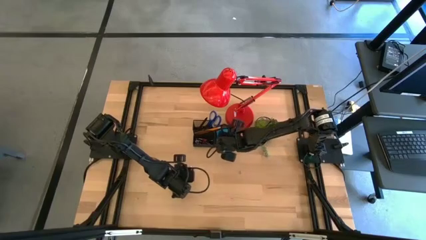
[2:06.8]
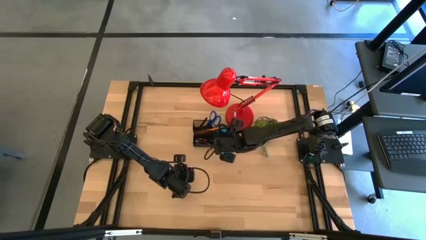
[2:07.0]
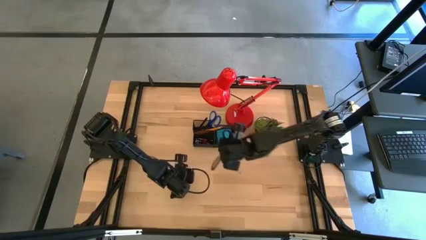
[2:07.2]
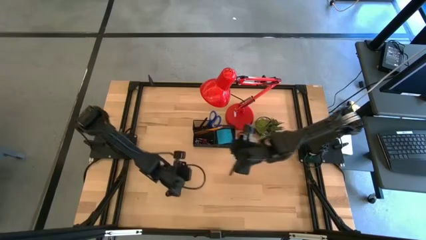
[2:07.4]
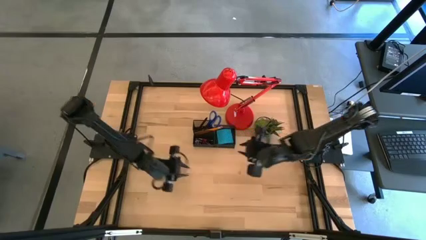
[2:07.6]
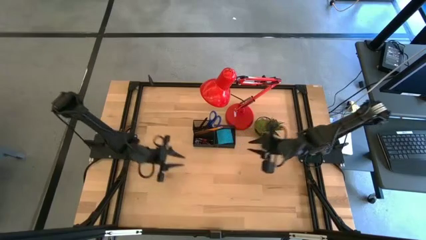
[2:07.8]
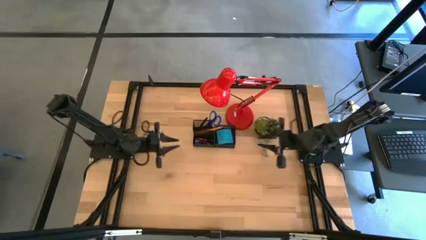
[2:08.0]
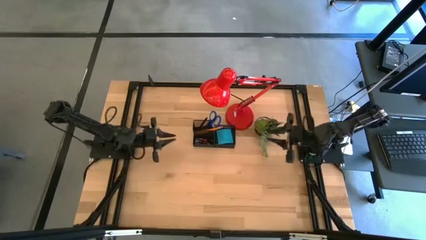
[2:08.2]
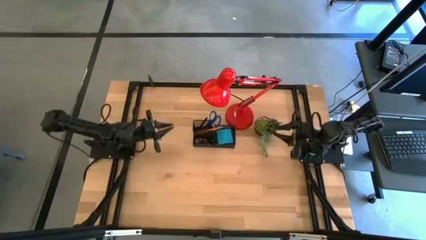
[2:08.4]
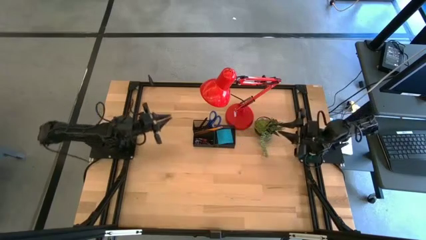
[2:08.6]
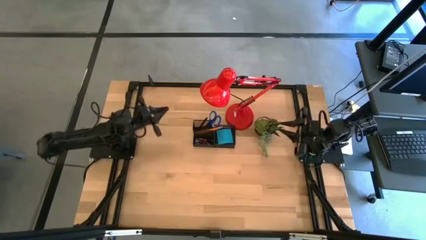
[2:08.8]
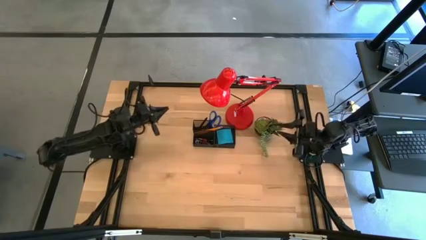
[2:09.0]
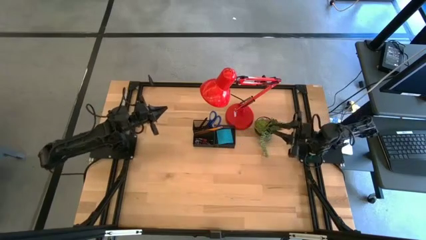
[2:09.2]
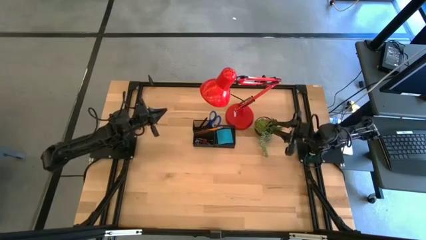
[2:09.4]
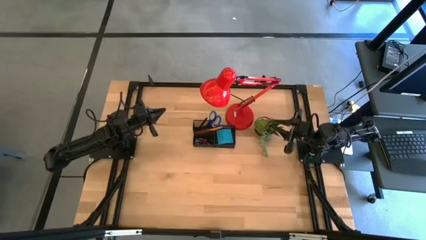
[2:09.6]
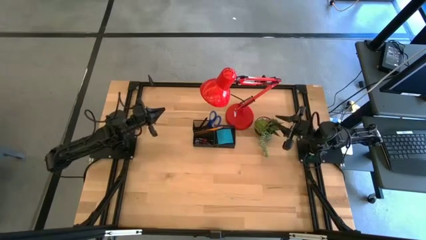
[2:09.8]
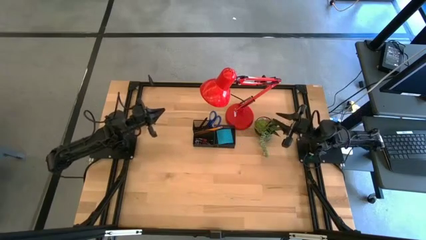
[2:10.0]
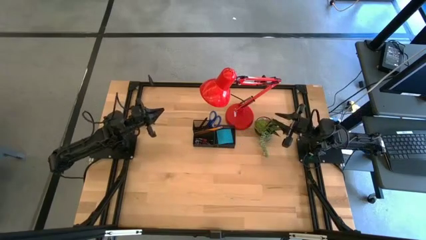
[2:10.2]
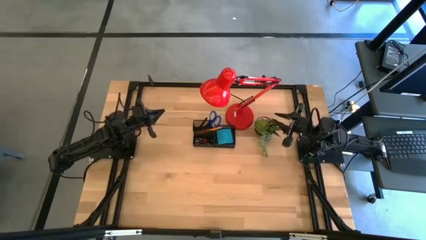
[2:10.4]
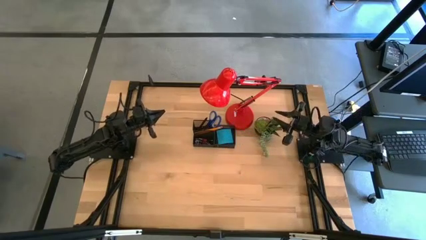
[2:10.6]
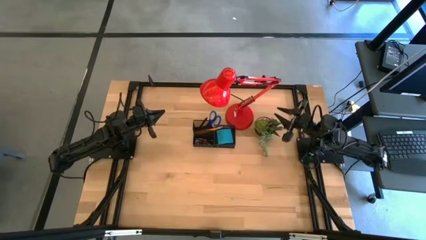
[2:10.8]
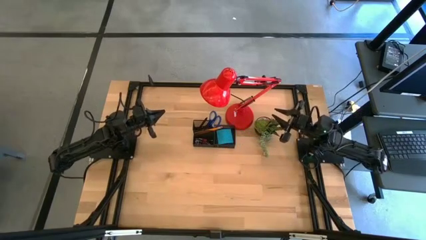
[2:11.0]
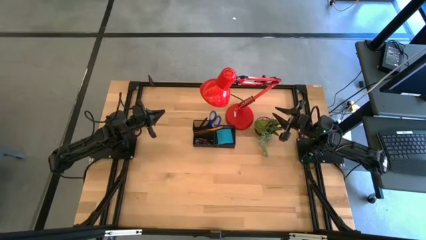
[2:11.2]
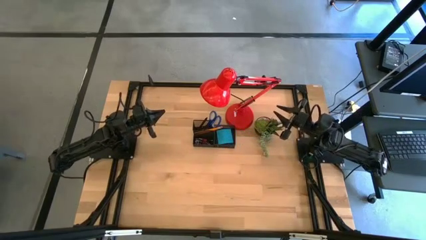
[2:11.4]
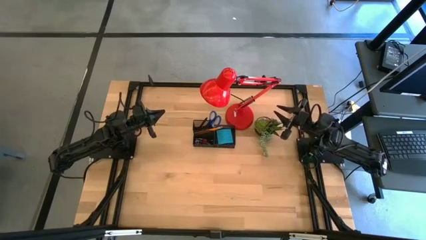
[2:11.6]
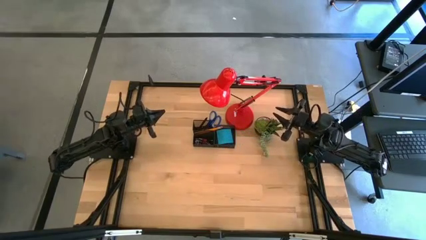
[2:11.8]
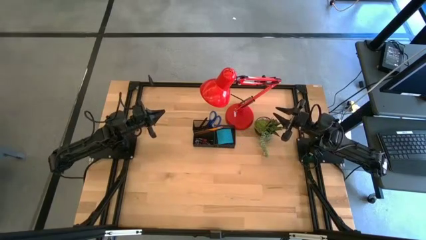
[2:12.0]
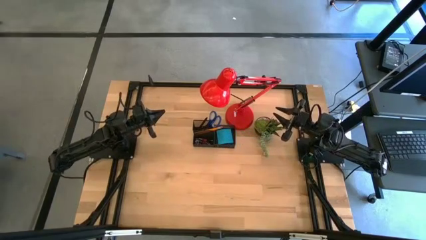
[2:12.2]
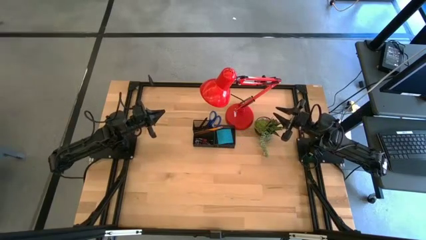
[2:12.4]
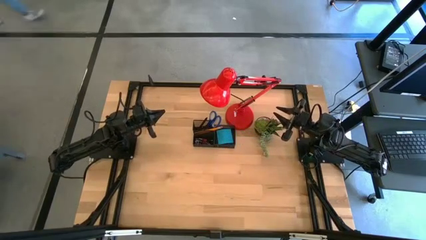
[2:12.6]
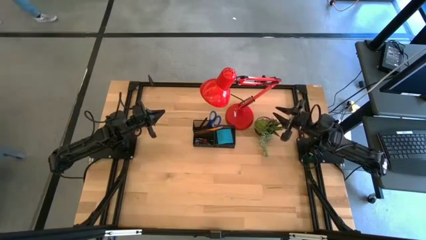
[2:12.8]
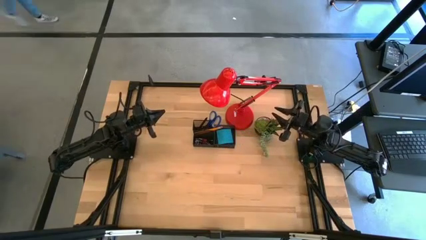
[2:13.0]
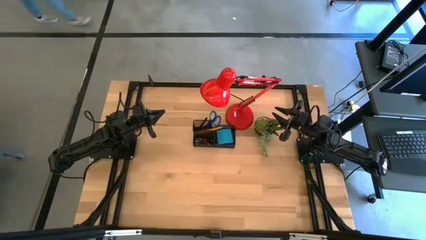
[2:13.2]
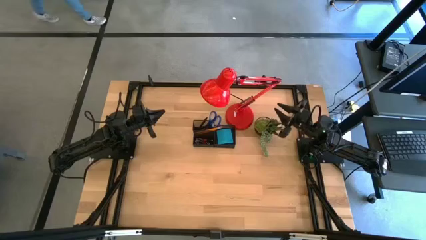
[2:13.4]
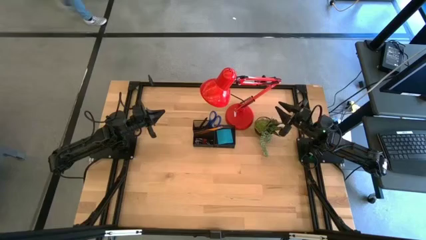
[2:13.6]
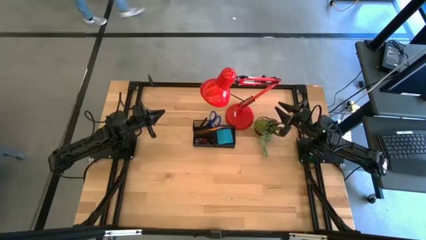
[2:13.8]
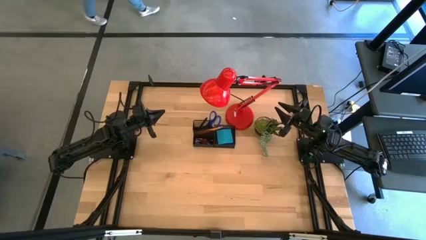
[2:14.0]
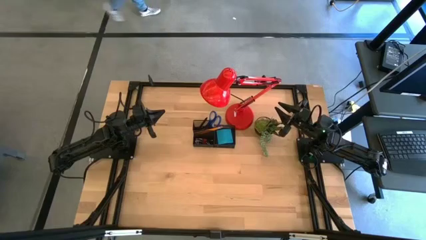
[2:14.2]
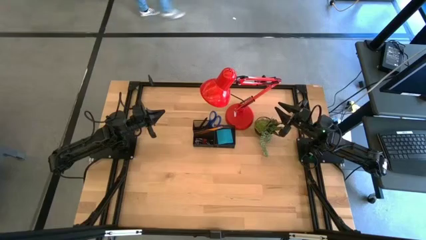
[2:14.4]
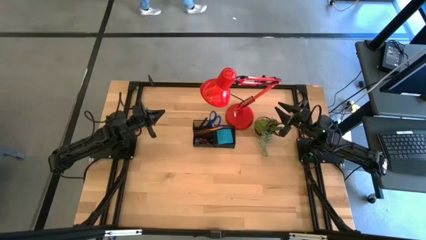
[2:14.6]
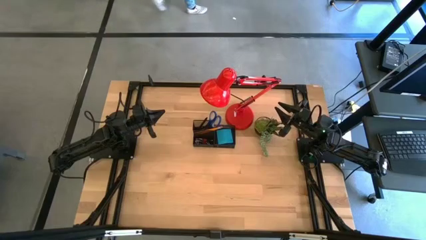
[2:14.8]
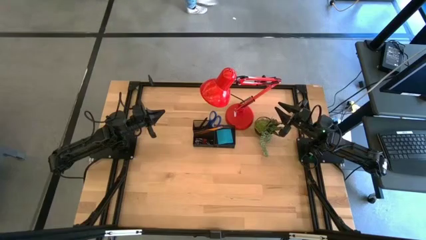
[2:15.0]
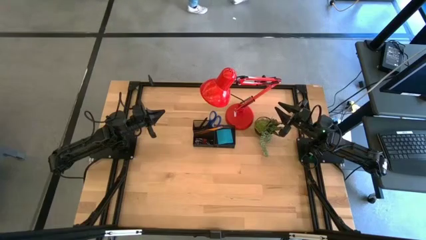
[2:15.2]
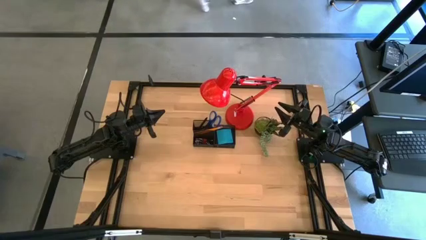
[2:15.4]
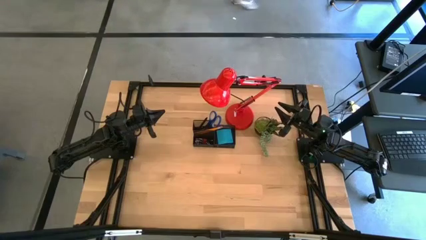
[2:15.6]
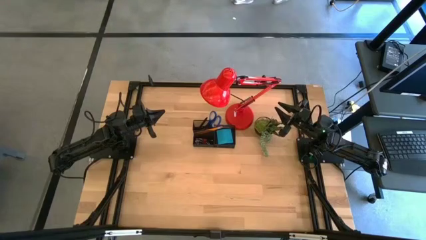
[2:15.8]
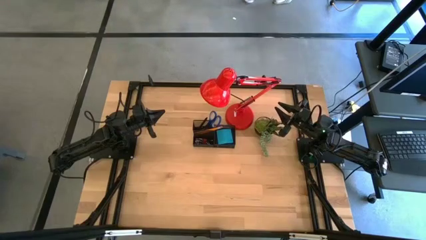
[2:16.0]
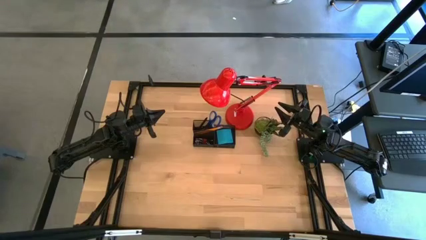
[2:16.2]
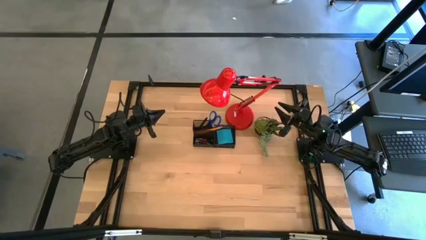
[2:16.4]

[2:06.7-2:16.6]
Task: Pick and place office supplies into organizer
Return to Home Position

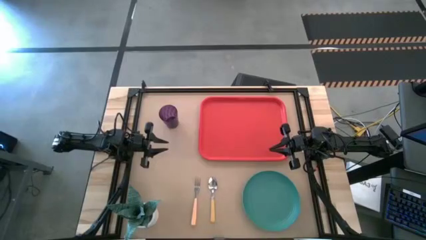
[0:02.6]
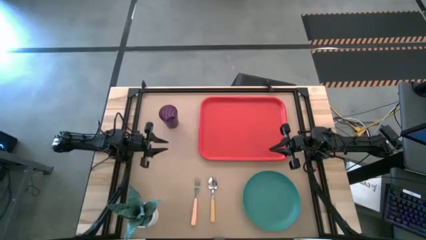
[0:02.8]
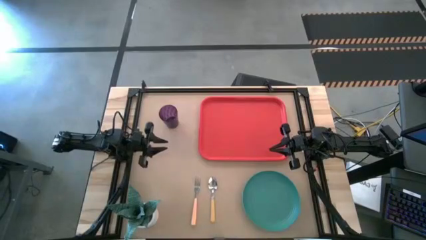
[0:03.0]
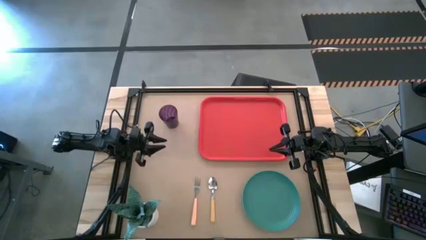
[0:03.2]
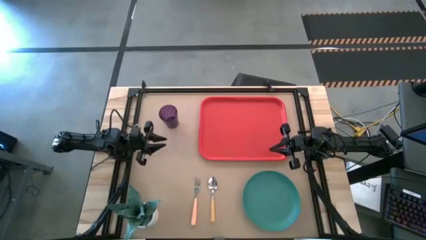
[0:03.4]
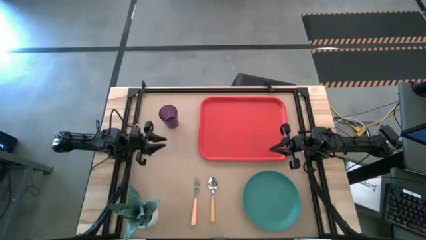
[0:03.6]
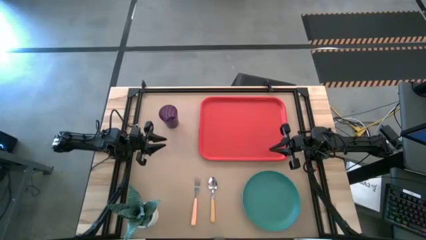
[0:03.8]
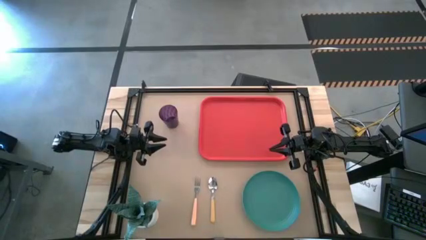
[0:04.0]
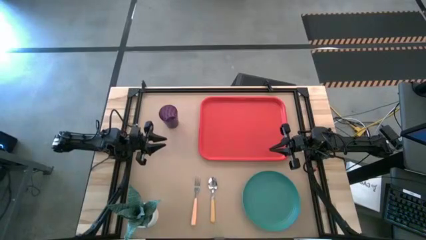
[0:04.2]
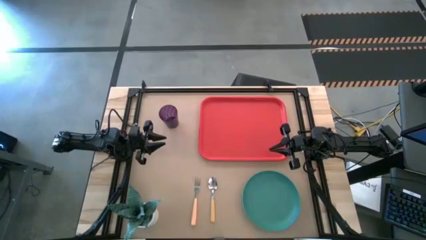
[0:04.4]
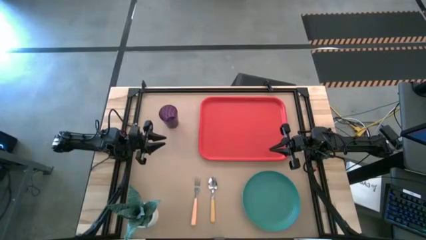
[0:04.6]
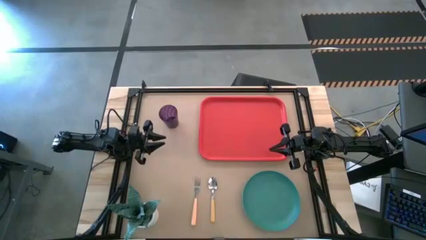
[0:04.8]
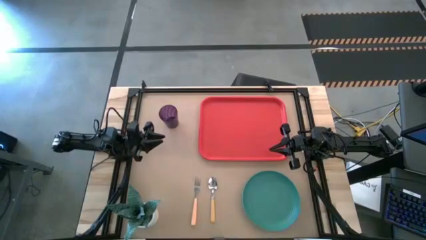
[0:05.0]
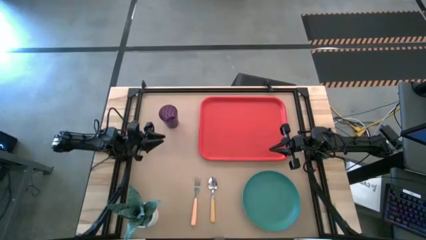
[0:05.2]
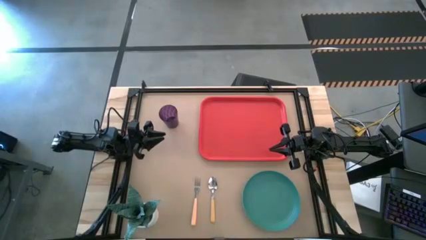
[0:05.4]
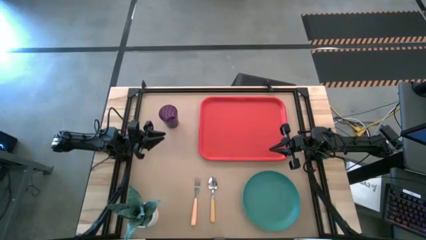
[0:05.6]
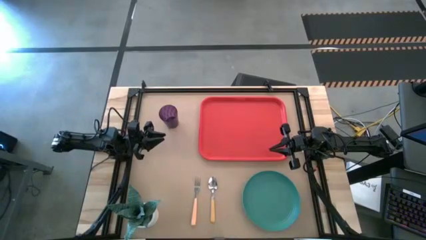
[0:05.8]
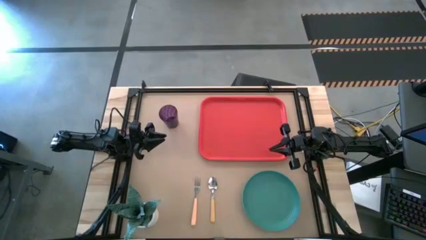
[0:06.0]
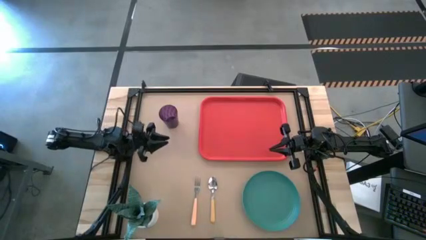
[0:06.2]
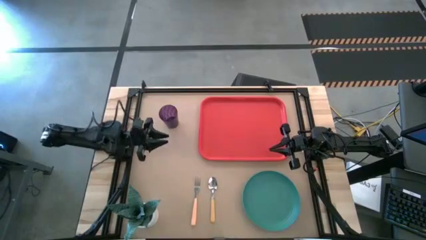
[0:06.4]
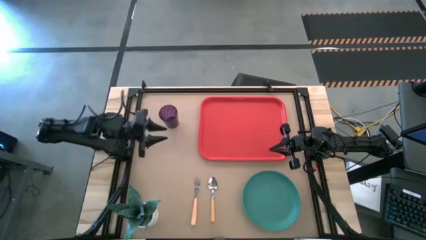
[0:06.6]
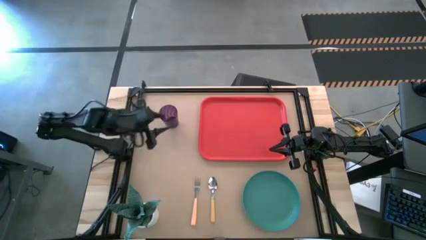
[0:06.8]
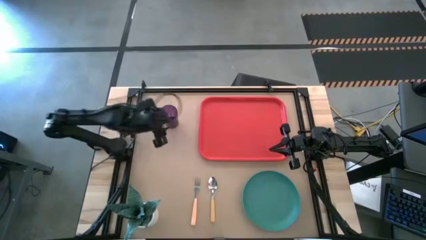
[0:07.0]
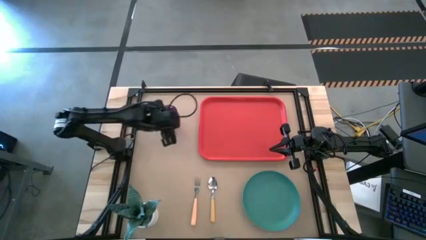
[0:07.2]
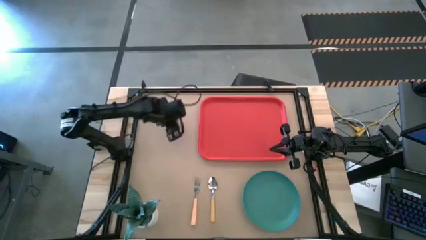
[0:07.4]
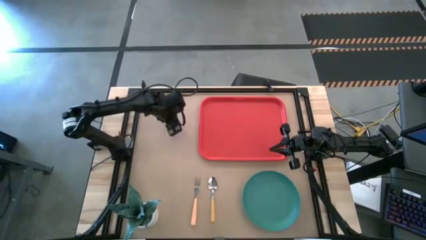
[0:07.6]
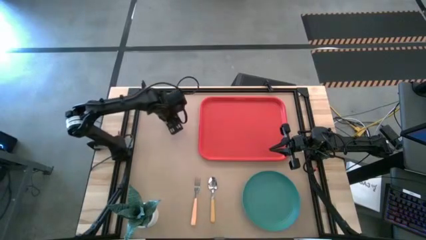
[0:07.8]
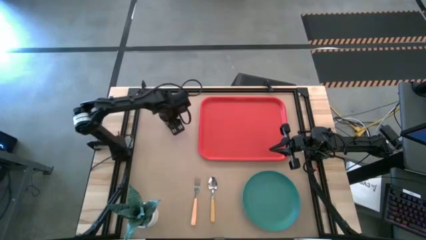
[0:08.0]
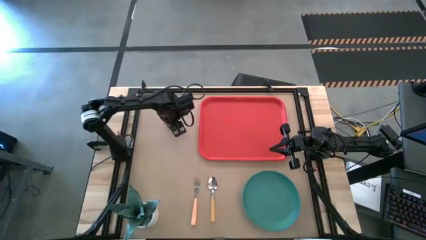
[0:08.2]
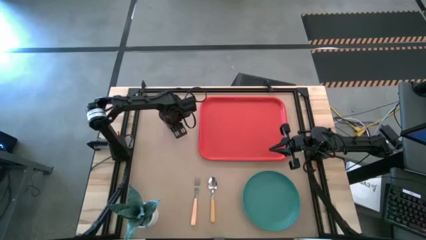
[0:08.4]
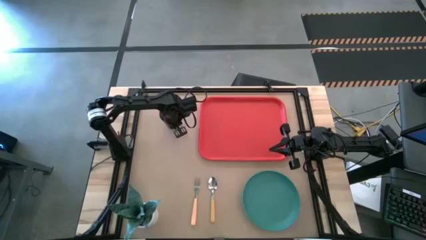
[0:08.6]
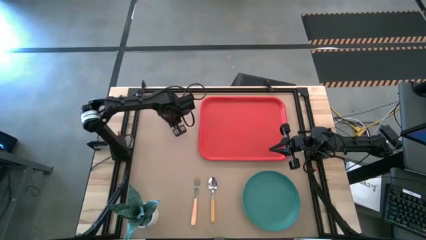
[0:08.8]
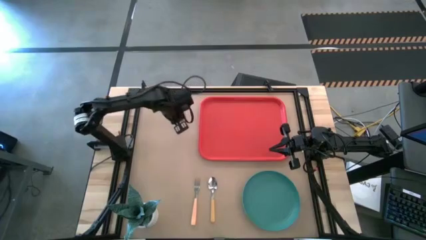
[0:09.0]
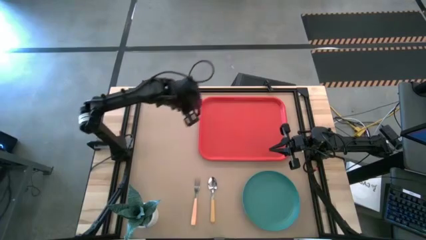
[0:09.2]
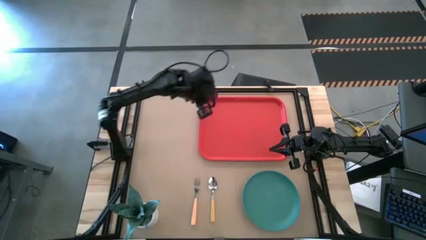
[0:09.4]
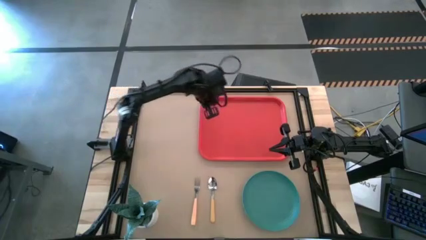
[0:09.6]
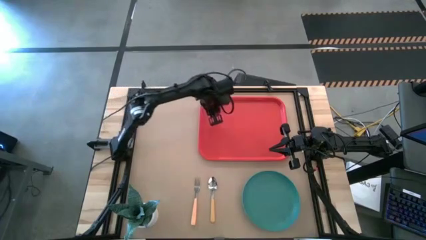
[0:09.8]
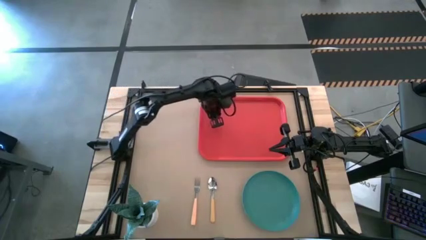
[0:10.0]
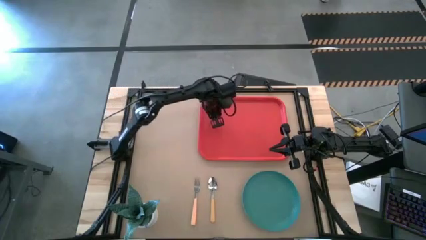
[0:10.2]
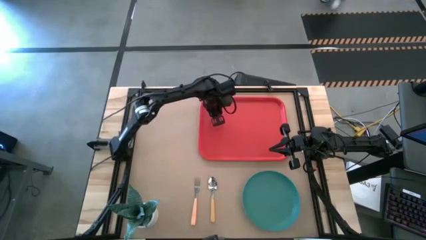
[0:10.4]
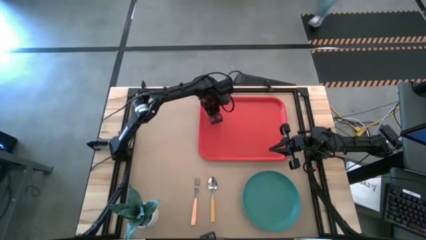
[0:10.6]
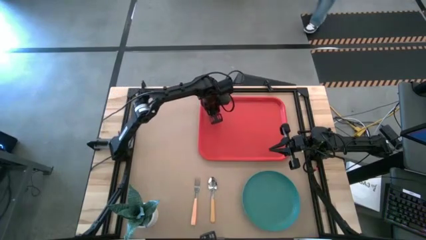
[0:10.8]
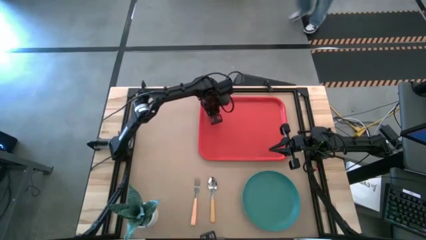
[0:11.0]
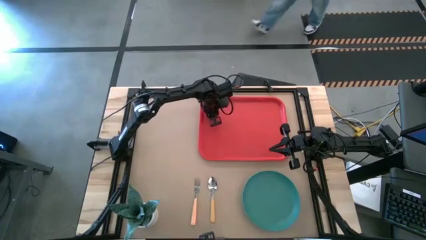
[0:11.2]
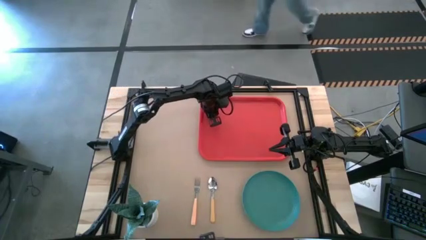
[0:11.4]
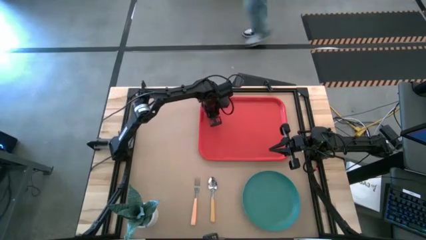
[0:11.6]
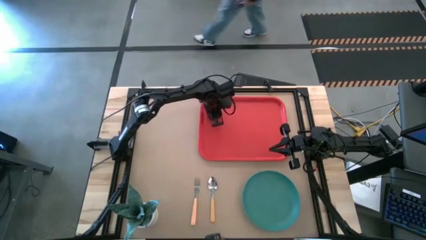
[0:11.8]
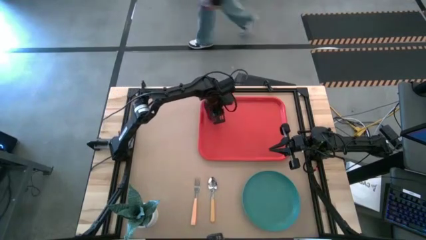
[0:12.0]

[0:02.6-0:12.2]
Task: Pick and place plate/cup/fork/spoon on tray
Put the violet glass on the top left side of the red tray
